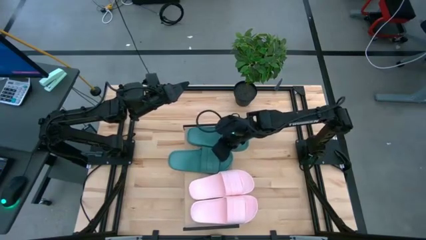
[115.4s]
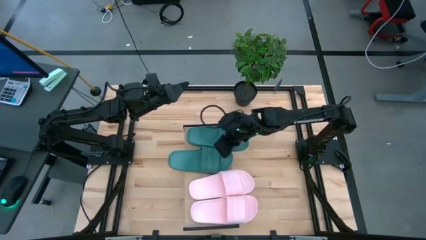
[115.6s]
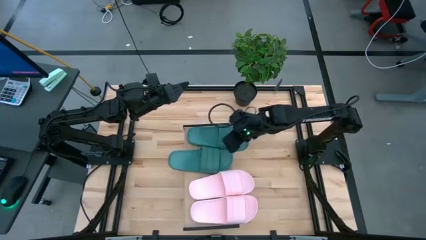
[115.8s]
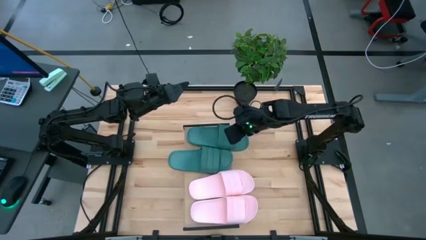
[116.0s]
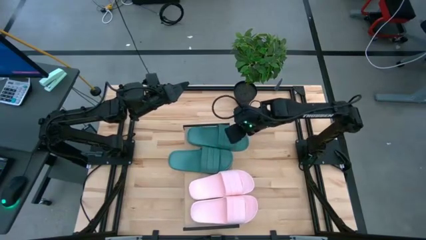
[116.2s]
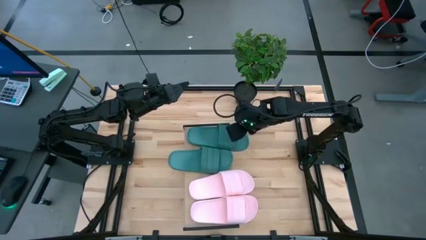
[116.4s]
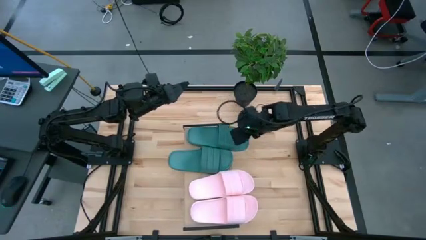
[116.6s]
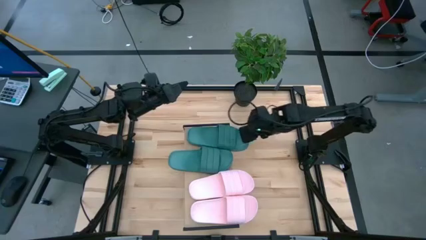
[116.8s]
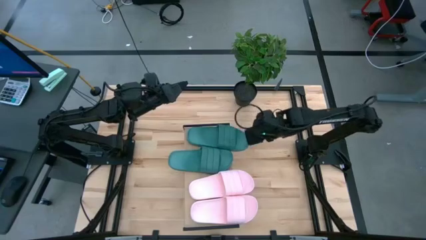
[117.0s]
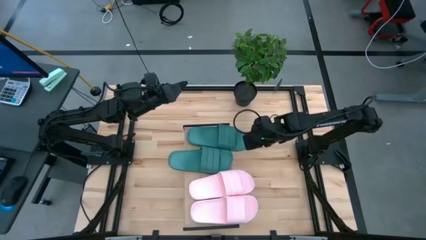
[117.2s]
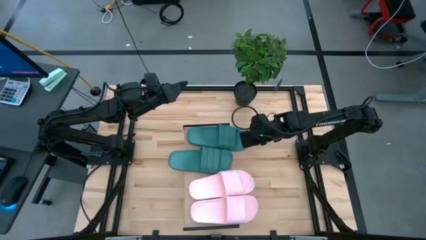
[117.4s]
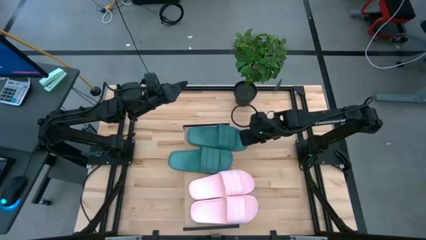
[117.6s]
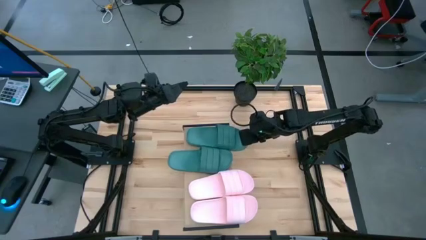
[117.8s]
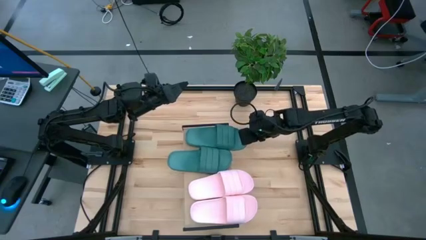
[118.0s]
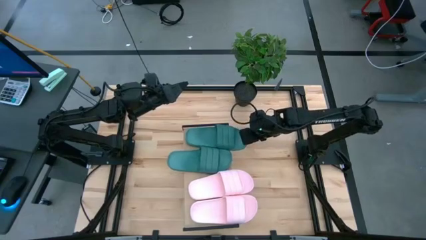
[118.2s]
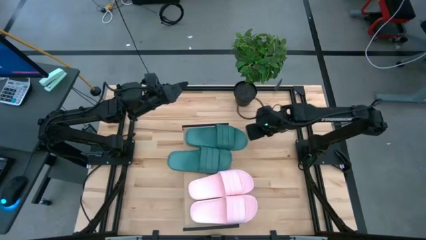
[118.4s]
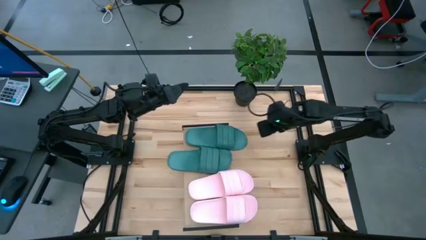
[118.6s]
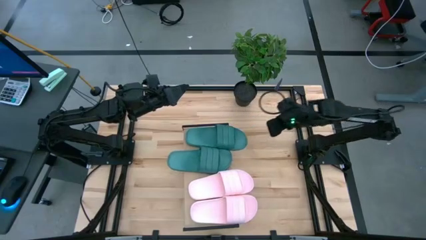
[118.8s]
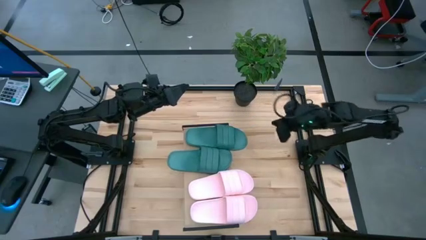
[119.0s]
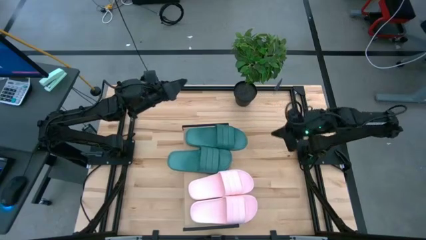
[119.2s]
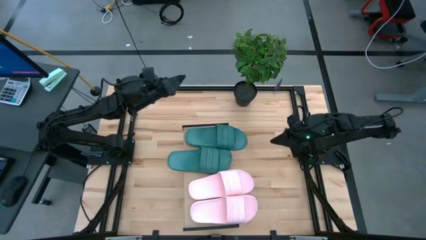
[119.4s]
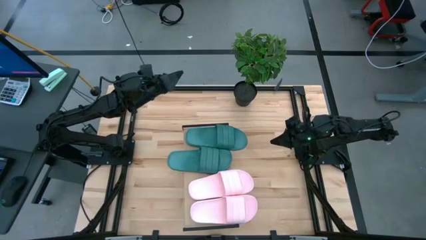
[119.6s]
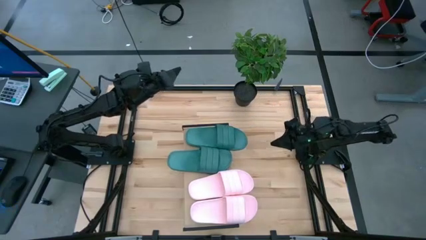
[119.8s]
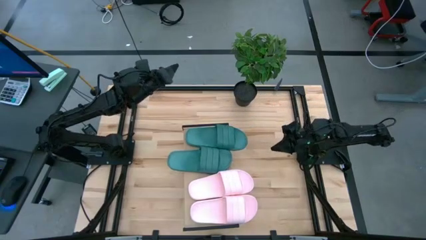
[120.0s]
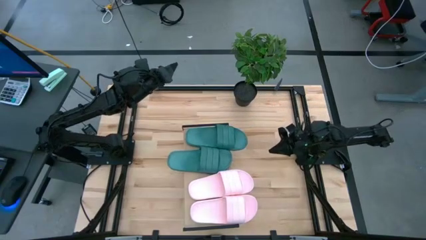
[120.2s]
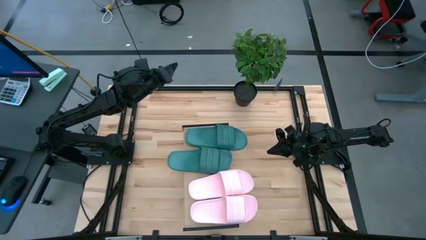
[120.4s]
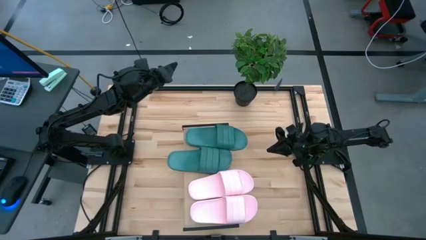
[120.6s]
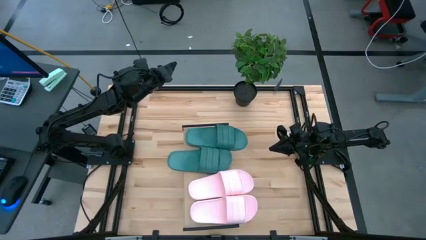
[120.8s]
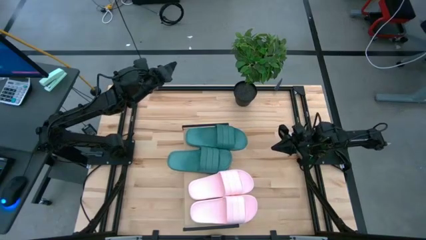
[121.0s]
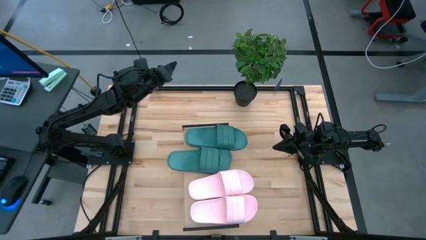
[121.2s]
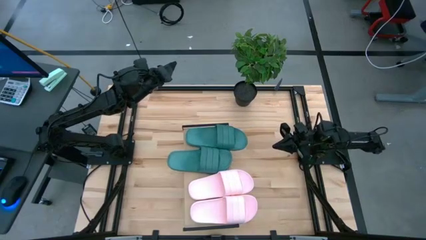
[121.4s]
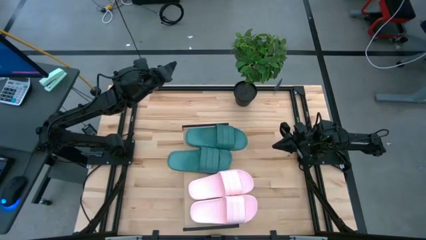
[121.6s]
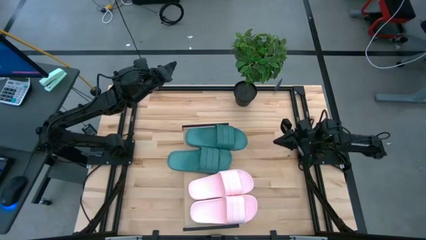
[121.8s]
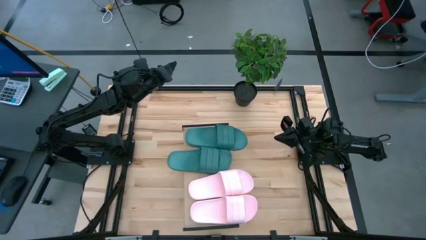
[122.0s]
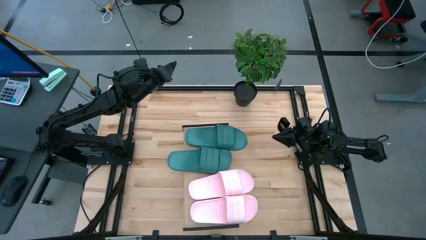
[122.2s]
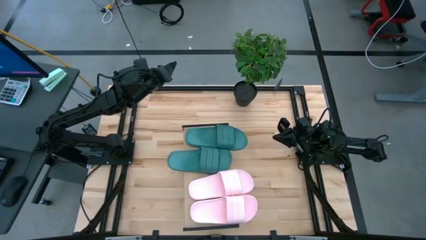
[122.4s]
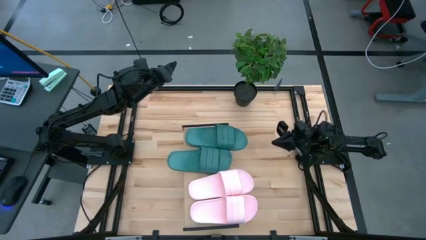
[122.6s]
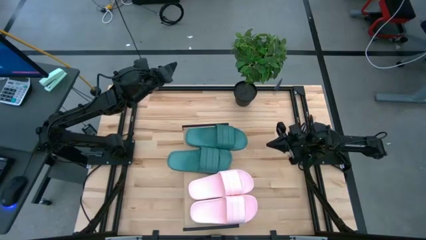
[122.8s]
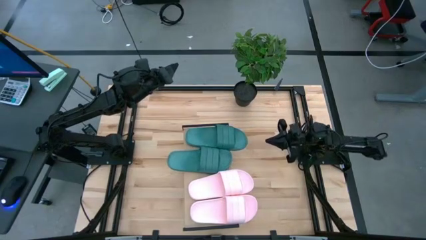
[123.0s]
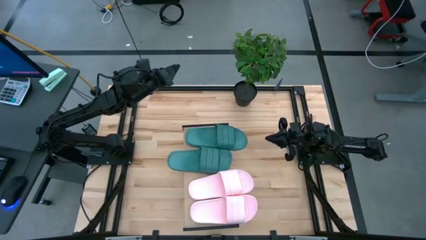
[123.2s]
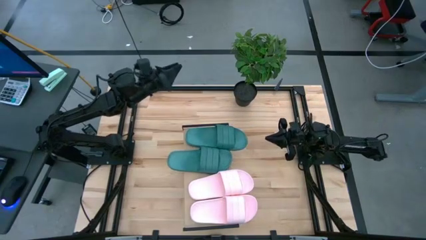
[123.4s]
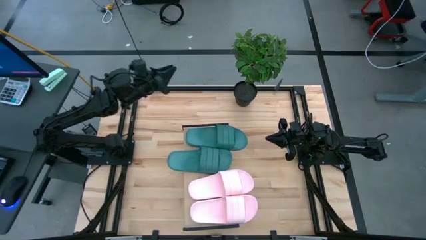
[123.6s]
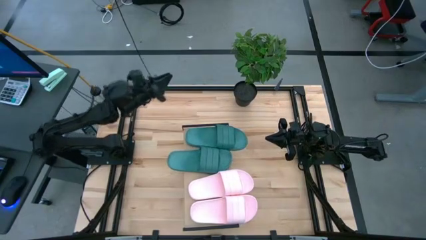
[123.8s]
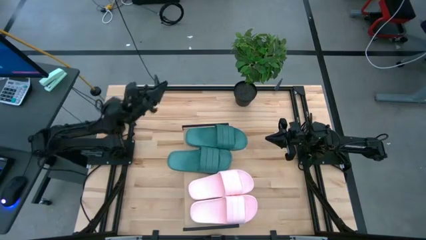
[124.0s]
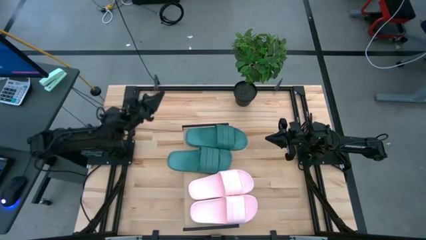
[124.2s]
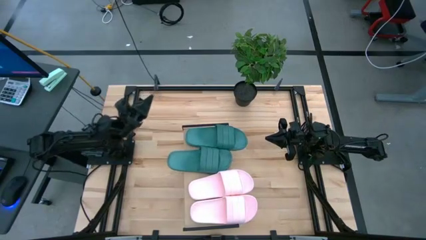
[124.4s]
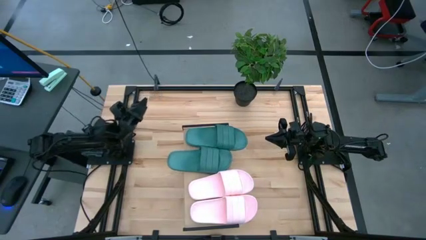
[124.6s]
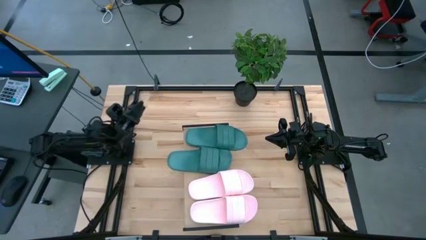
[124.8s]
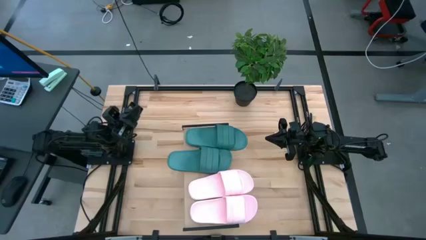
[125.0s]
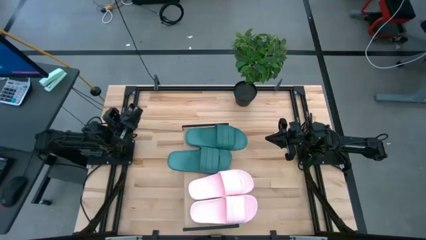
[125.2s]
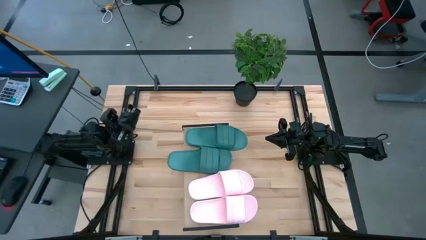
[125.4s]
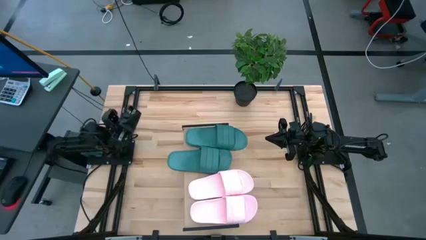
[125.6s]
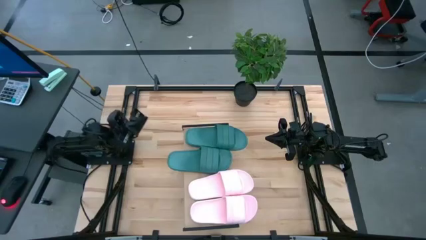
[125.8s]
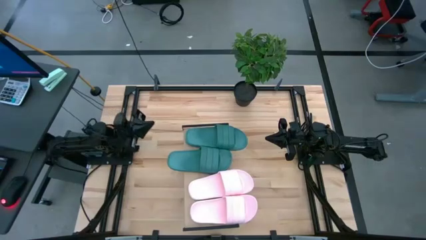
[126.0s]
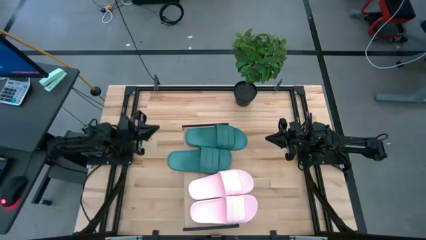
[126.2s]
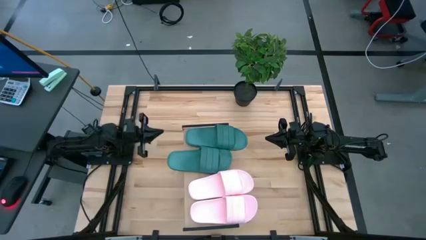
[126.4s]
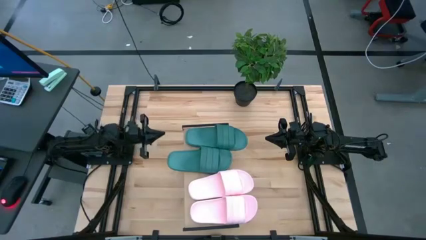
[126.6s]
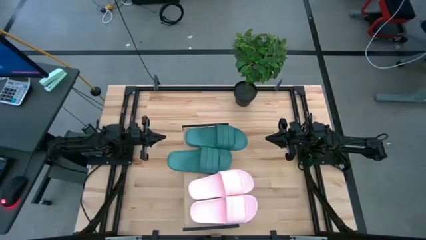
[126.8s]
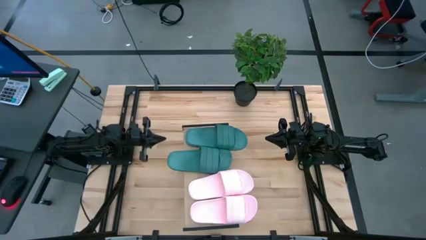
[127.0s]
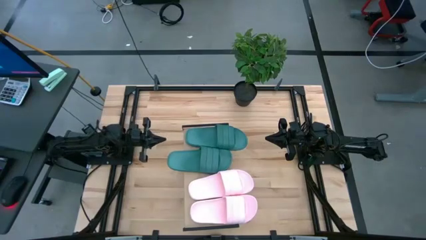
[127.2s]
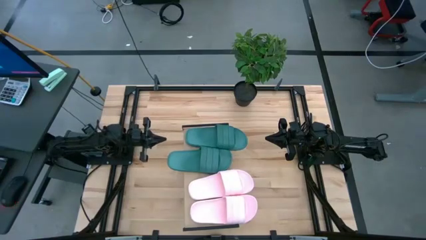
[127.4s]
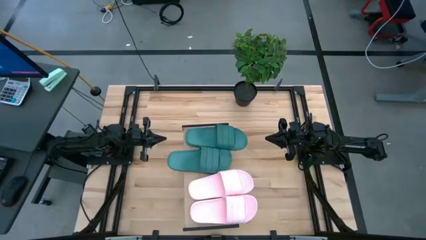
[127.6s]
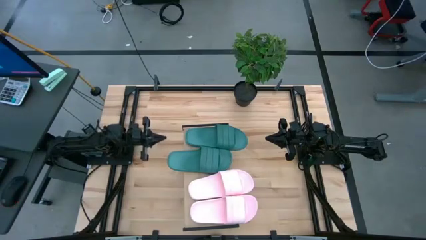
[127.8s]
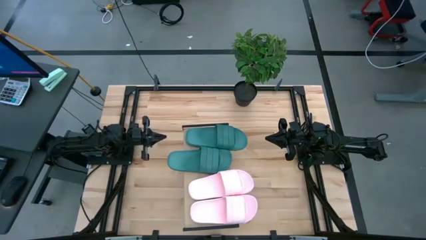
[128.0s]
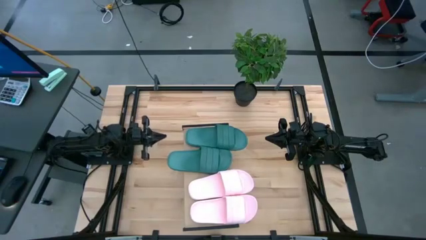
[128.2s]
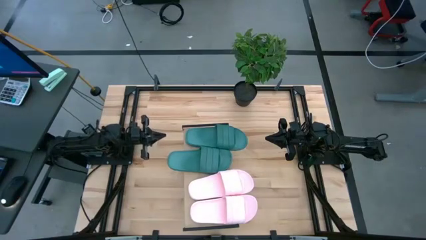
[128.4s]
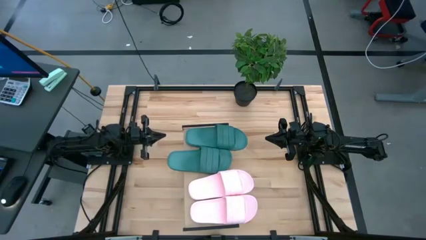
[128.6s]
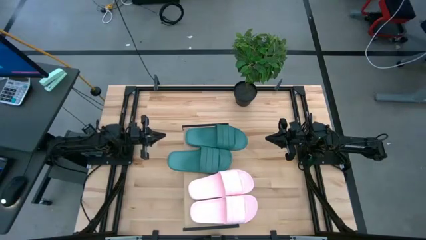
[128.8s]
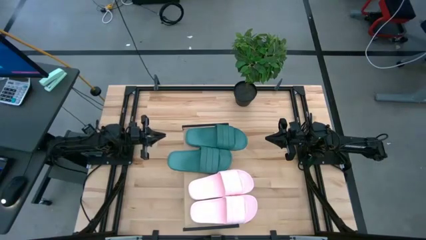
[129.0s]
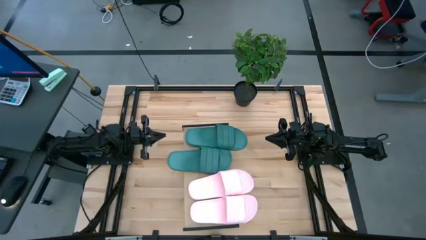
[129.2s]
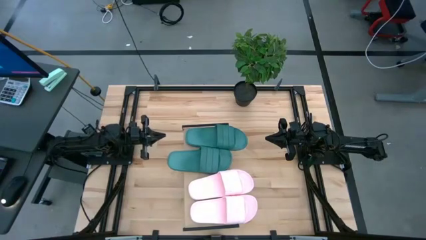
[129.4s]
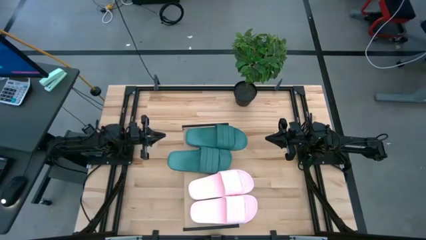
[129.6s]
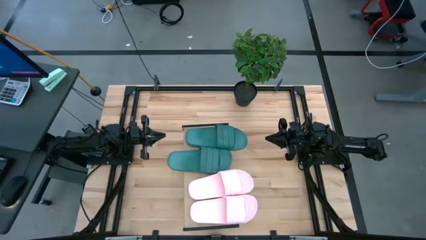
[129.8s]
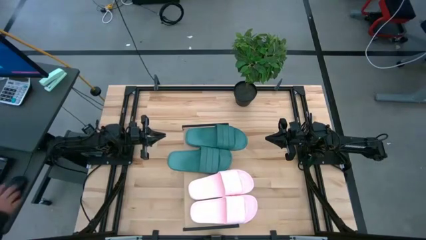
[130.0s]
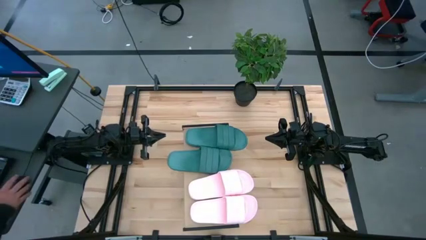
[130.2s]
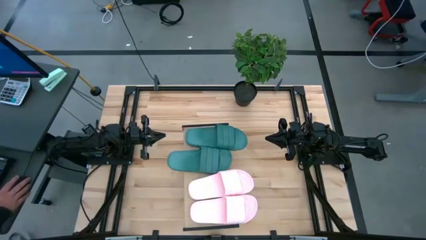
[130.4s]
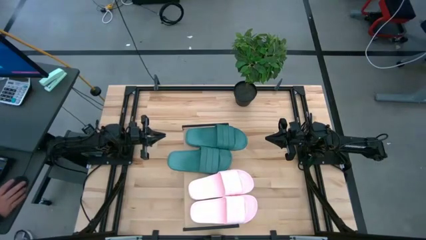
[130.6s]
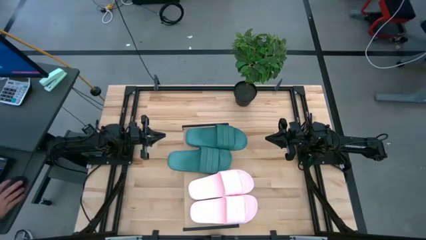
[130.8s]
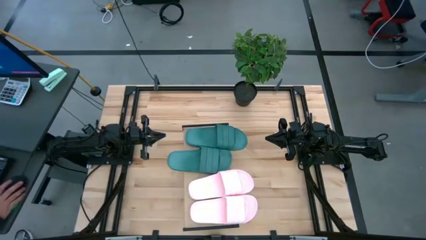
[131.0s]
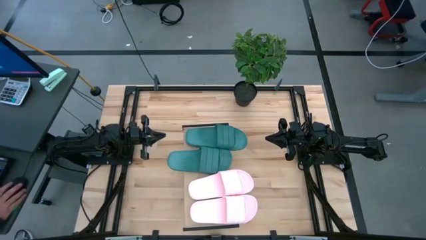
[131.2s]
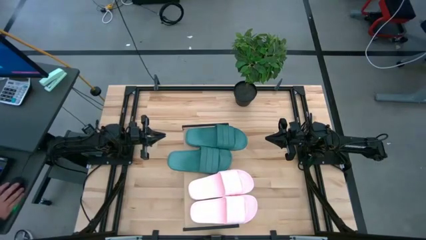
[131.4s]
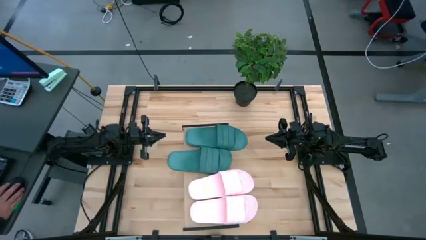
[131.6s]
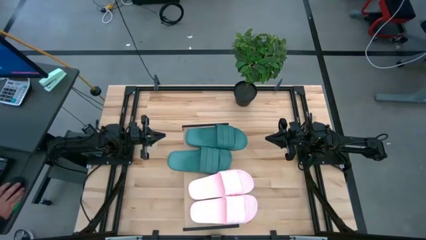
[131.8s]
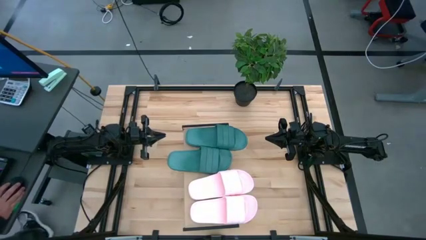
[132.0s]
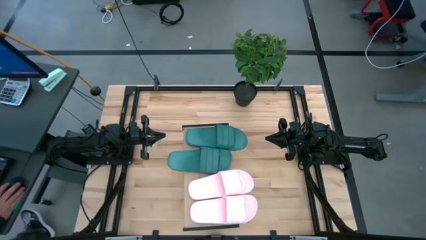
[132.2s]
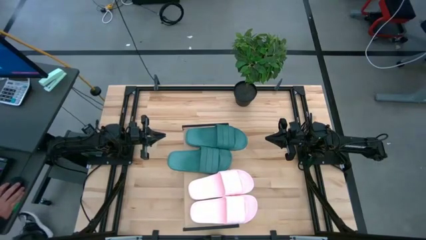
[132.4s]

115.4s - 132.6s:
Task: Pick and place slides into the shelf
Return to Home Position
